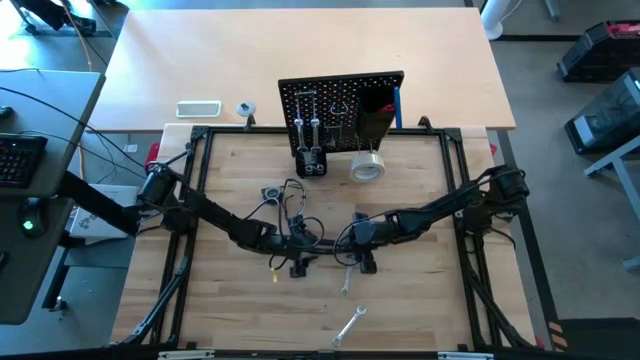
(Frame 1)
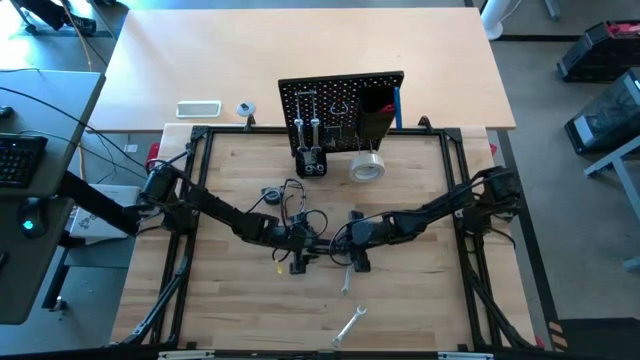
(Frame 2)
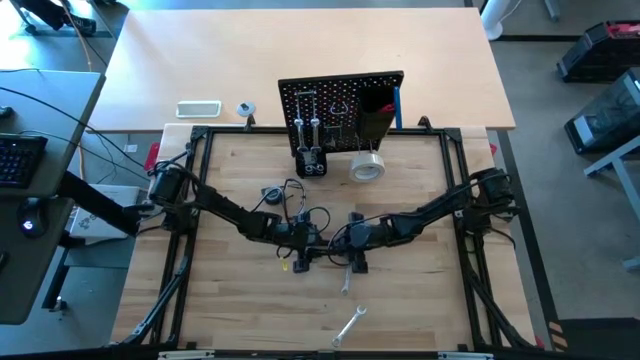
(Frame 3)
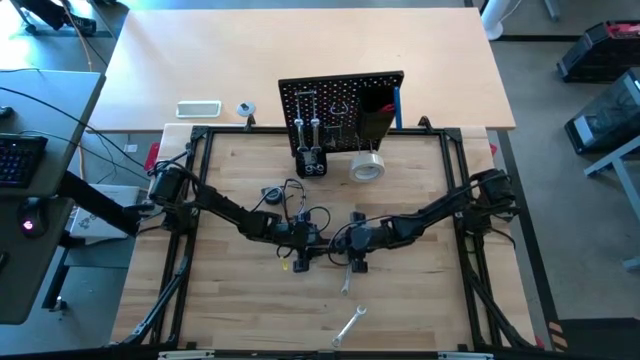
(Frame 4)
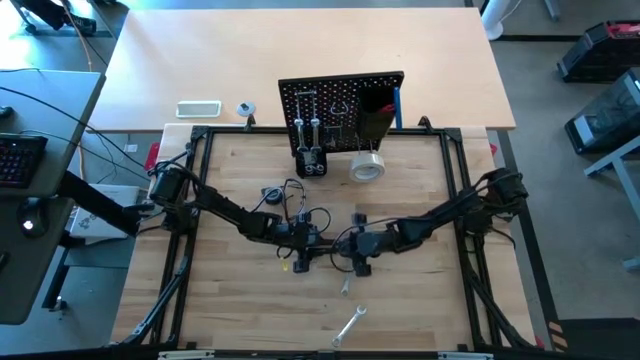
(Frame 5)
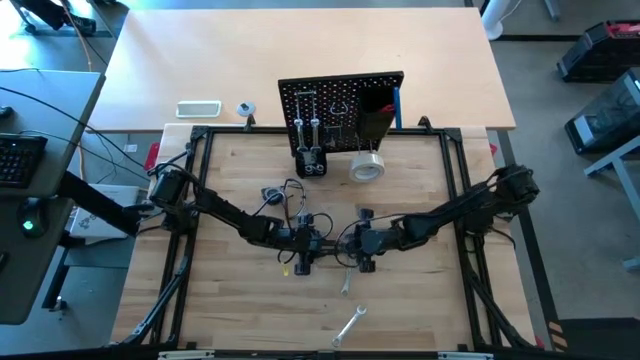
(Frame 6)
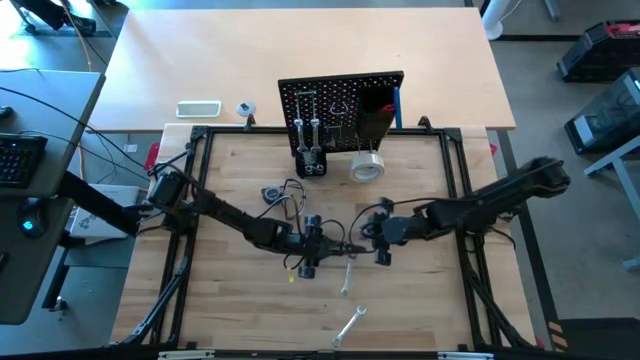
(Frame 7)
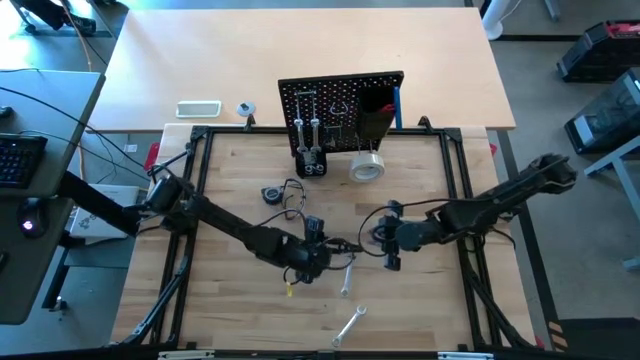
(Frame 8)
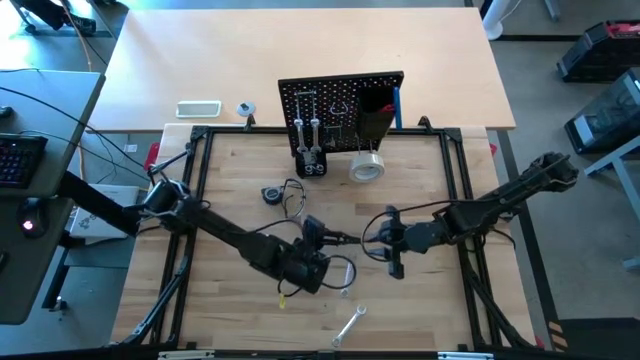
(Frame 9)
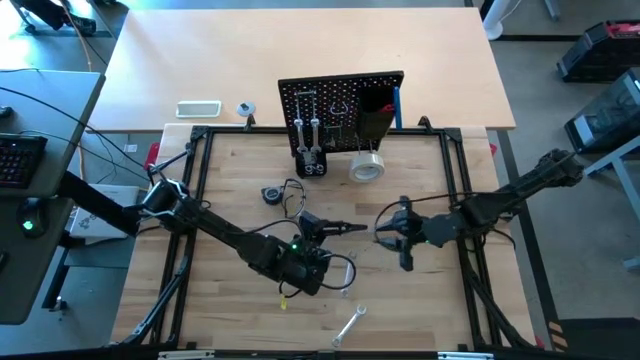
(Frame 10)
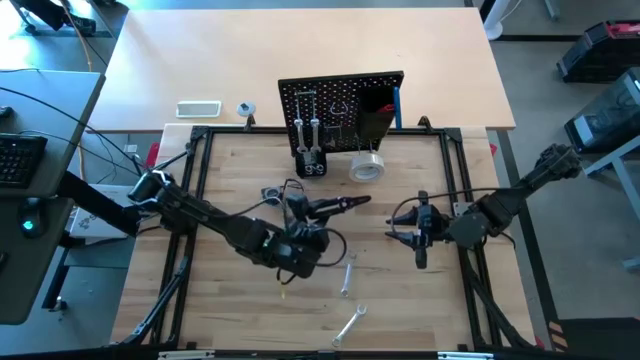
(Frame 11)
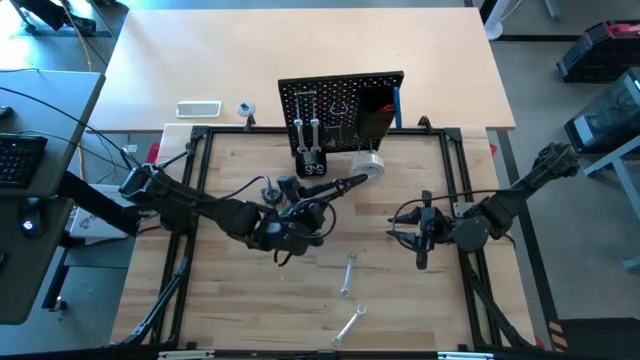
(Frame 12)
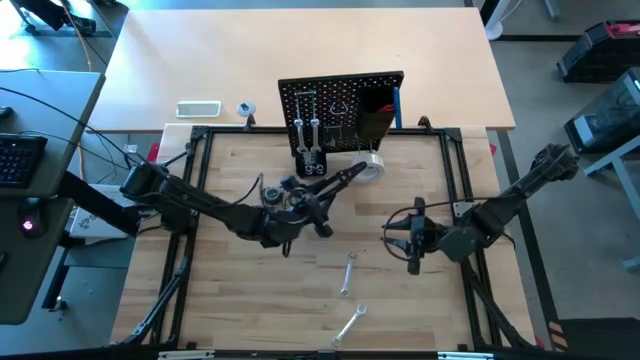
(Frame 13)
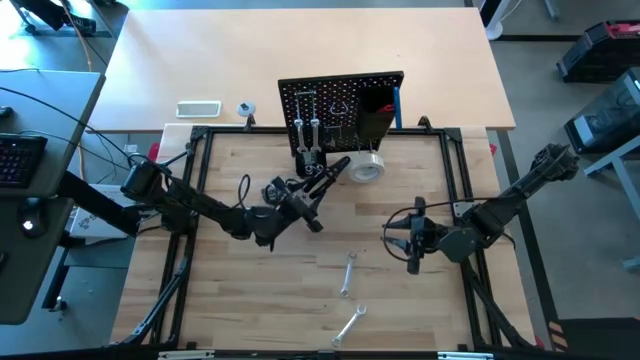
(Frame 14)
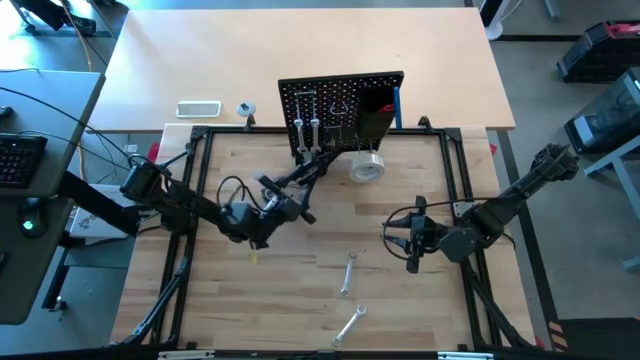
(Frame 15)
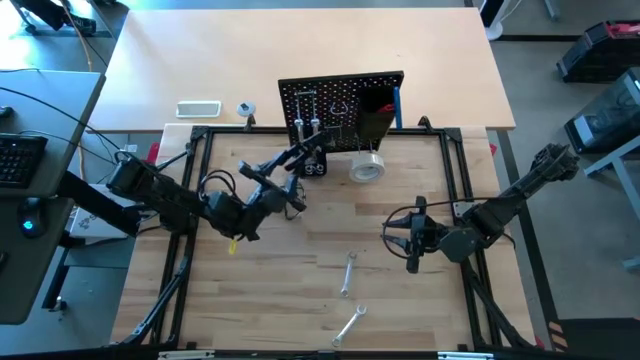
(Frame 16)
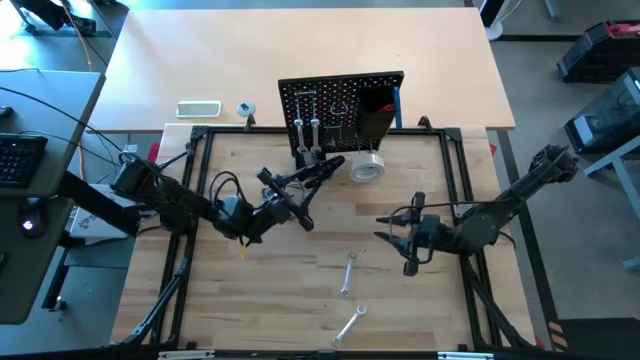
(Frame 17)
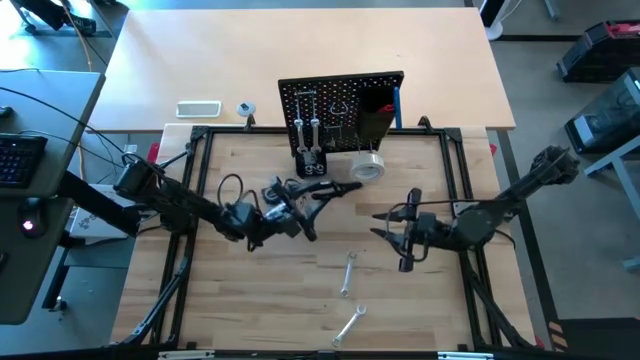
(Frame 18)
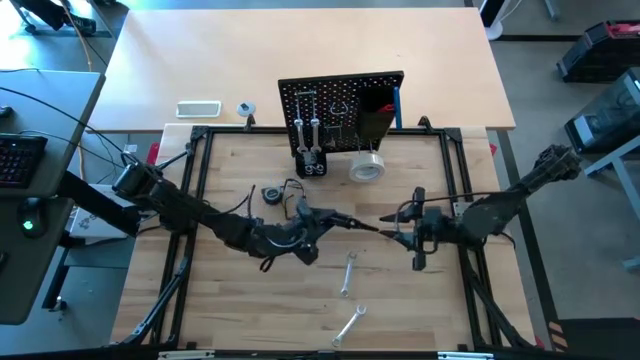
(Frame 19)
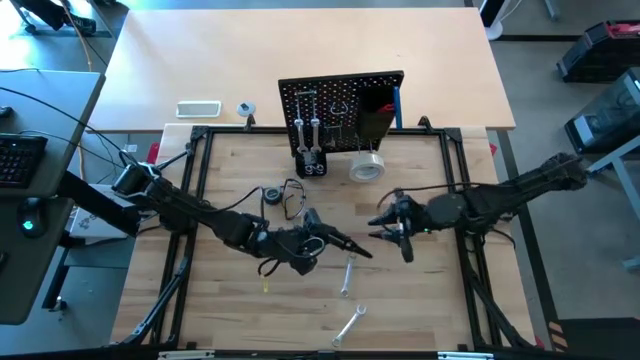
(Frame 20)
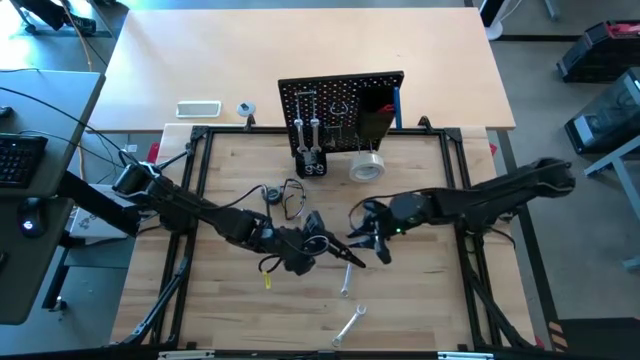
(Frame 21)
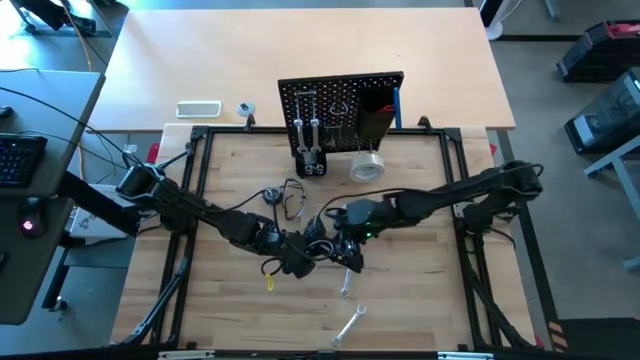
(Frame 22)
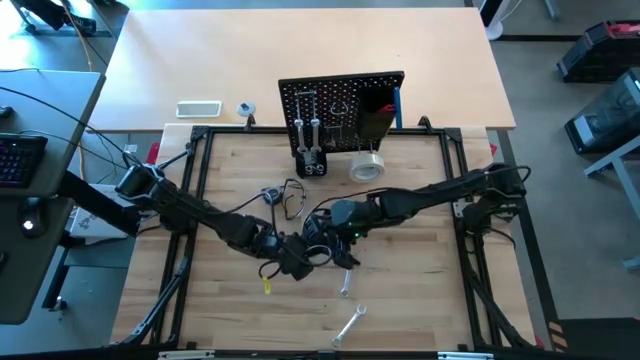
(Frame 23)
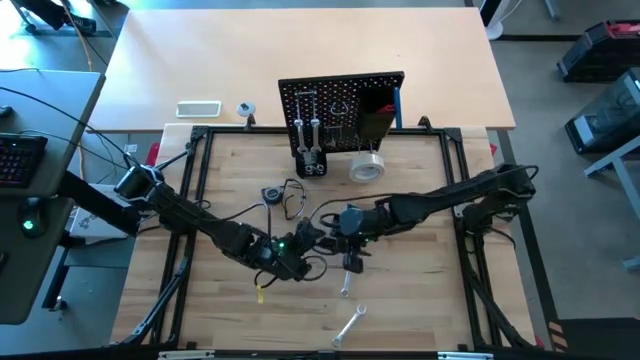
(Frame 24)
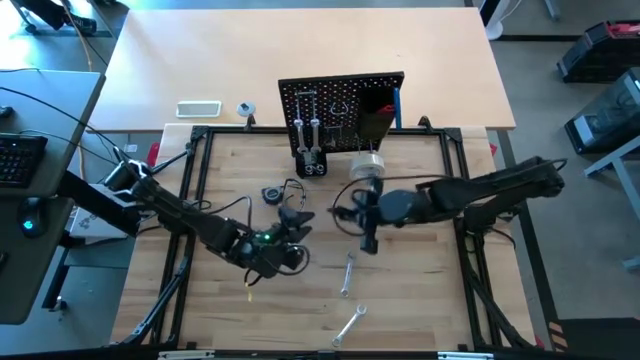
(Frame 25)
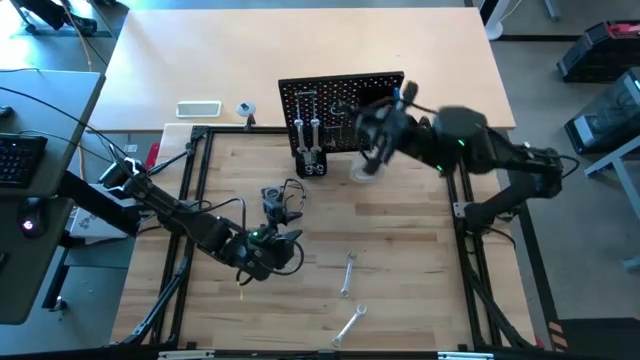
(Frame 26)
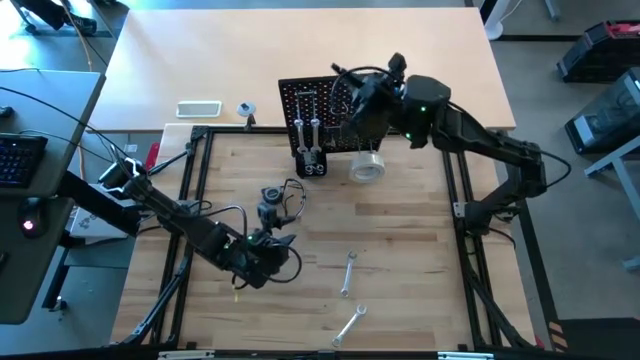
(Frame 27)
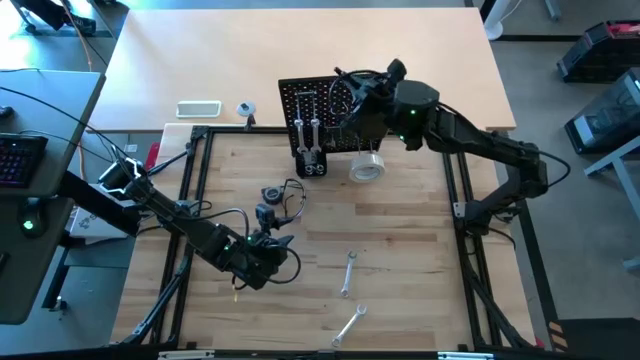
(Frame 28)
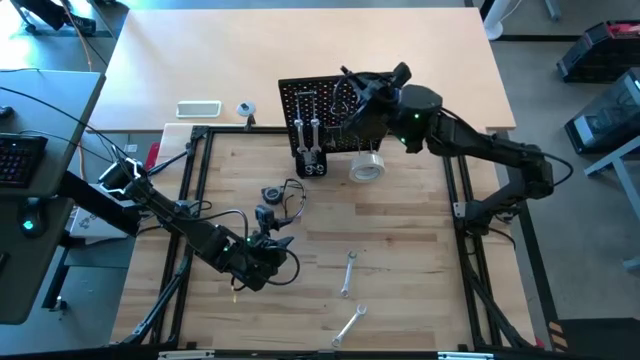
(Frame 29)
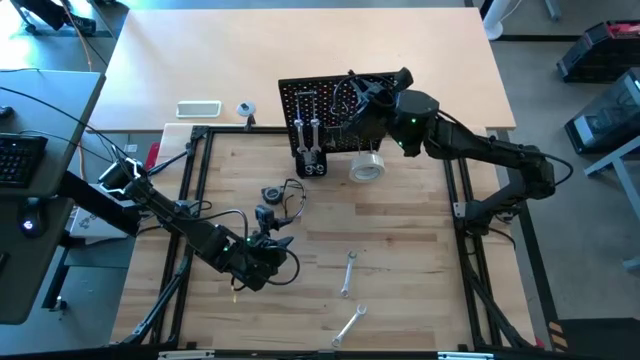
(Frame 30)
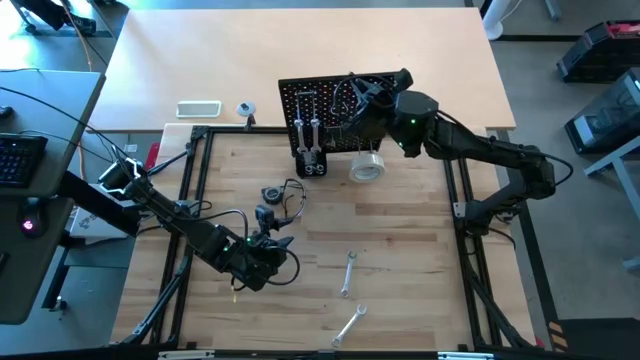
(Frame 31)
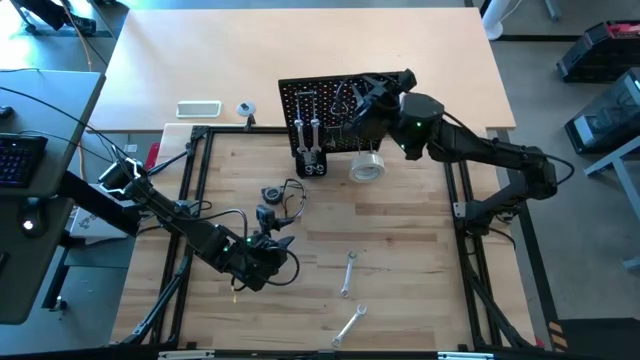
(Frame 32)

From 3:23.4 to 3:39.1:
Task: Hang tools onto peg board
Put the black wire stripper into the top black bin on the pegboard

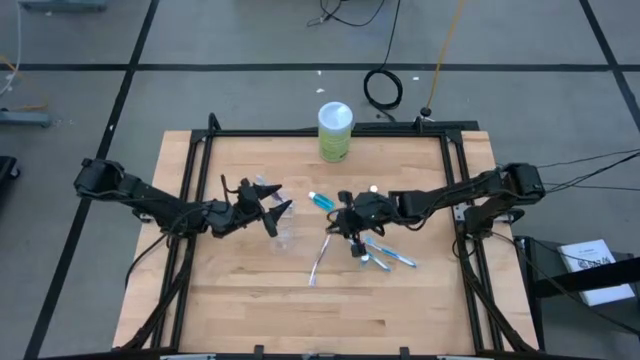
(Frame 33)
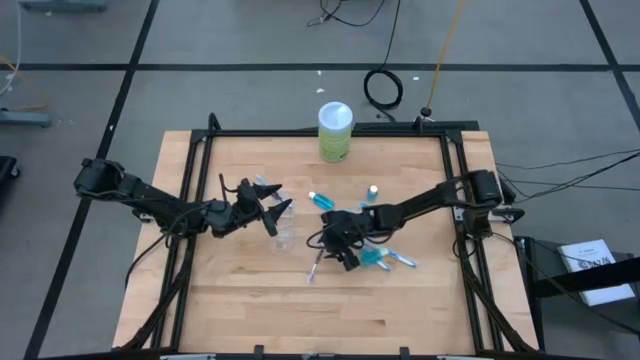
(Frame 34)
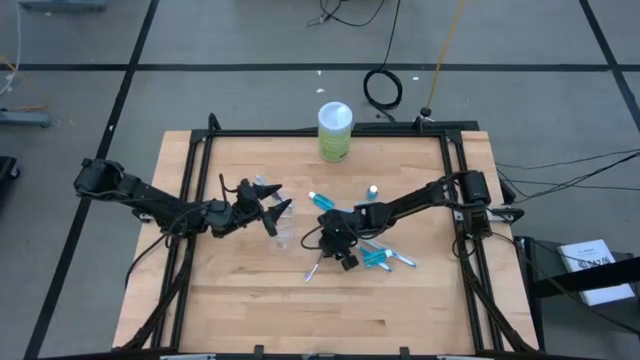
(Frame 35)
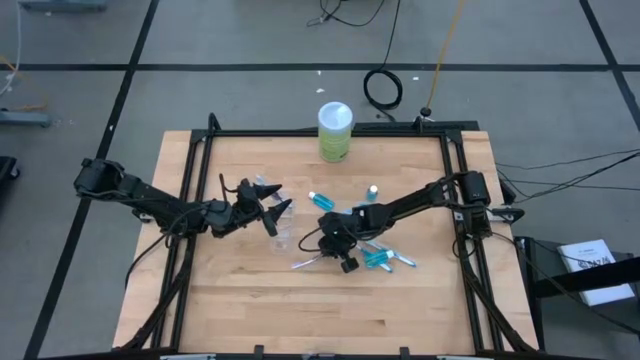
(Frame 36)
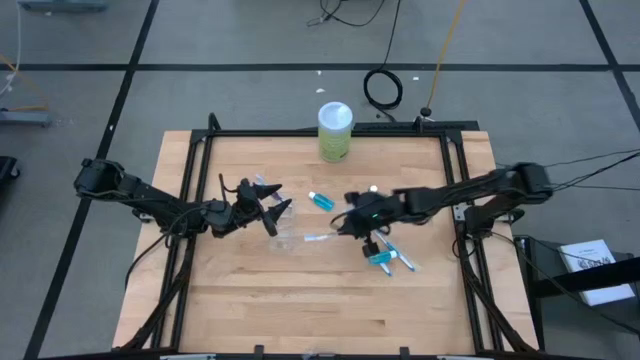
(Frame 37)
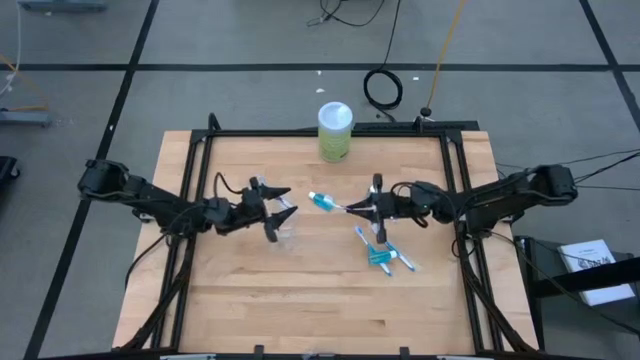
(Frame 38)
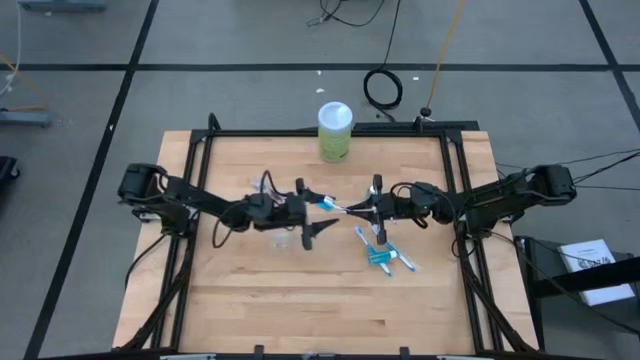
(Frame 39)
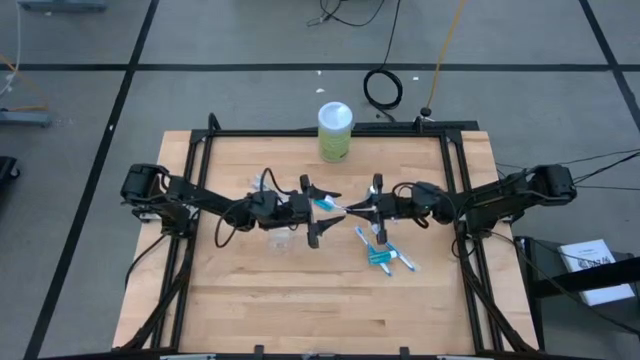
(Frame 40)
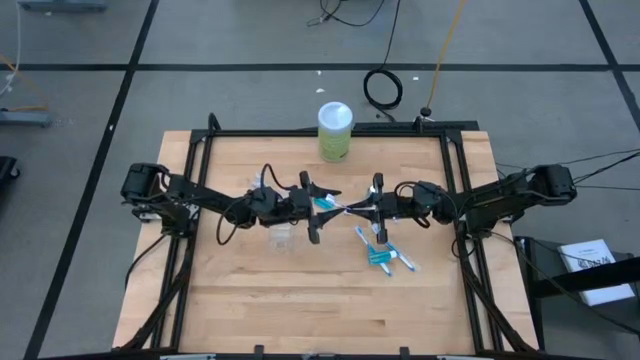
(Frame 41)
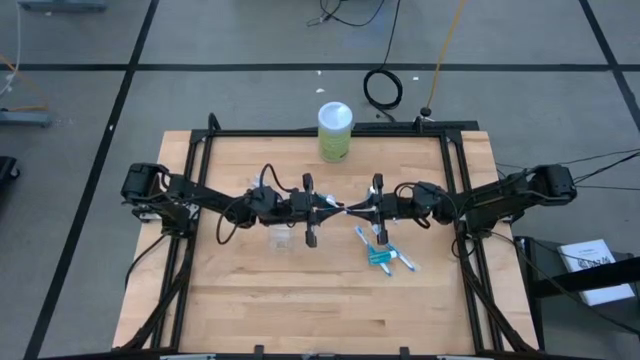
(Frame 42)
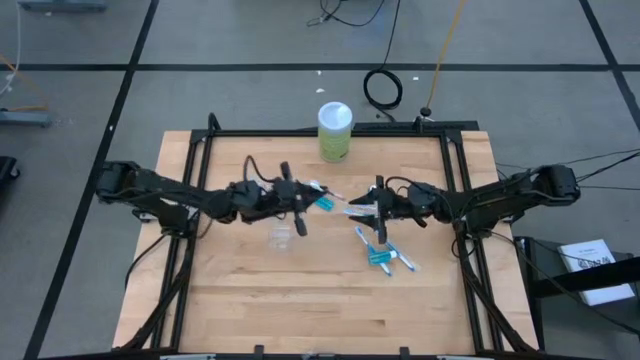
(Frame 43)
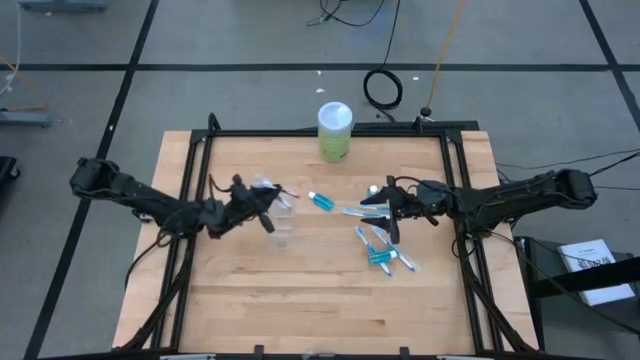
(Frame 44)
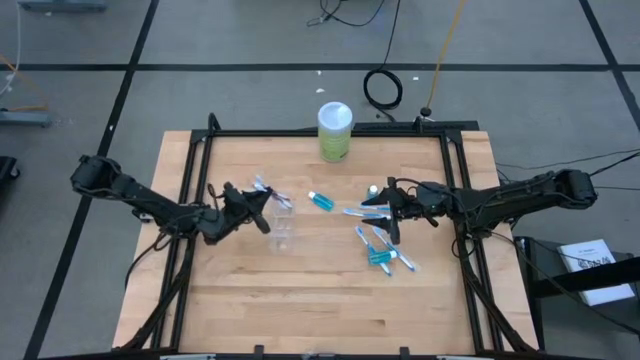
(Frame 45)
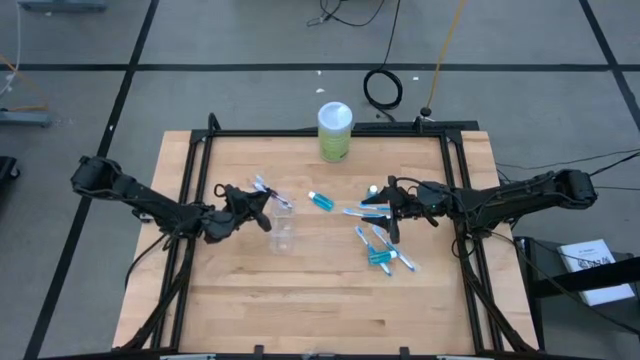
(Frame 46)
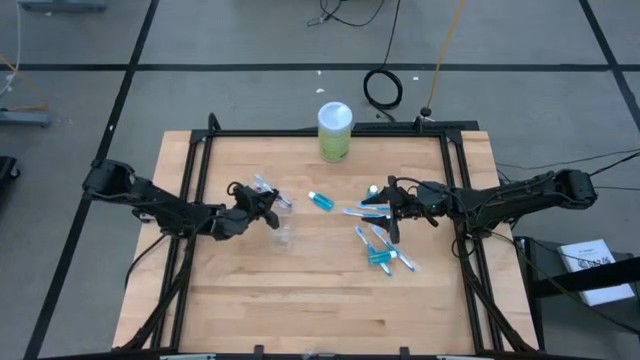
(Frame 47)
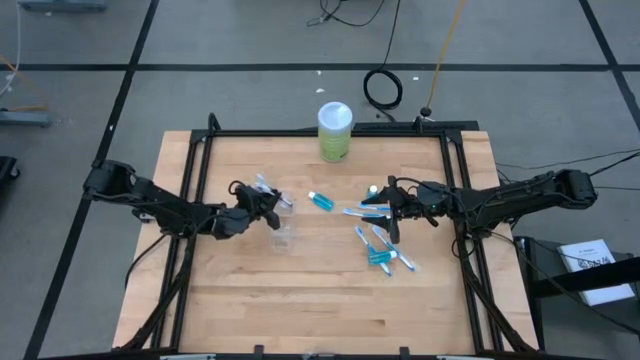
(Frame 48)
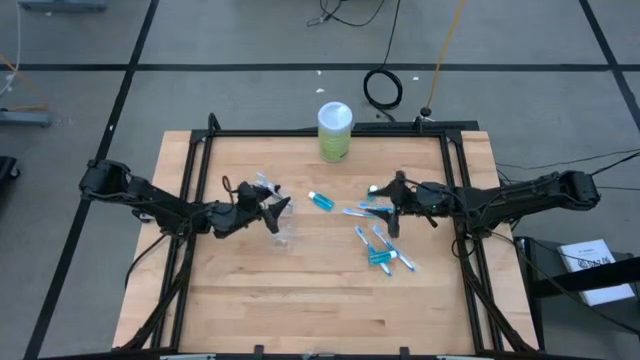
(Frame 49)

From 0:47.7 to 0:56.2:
Task: Pick & Place toothbrushing station
Put the purple toothbrush into the transparent organizer
